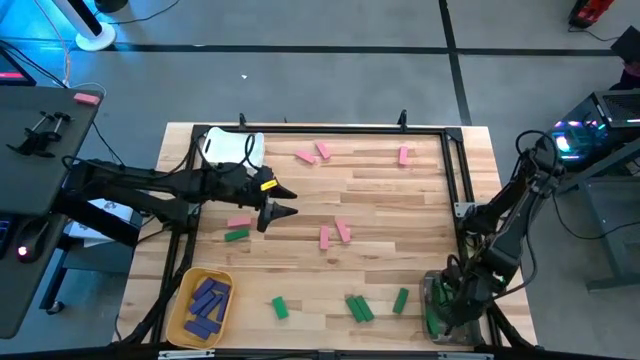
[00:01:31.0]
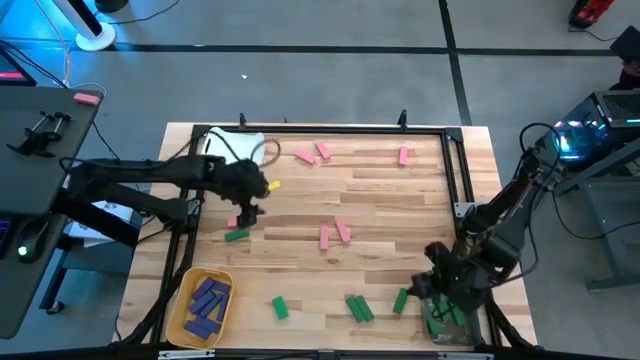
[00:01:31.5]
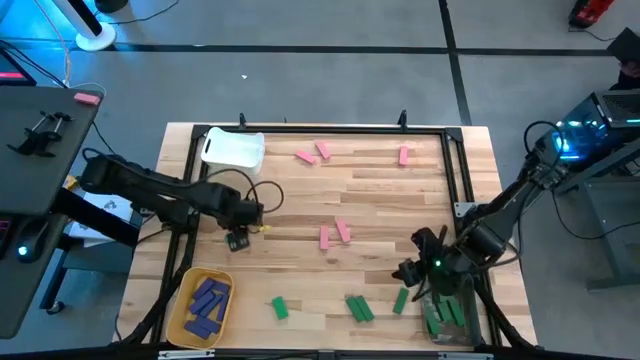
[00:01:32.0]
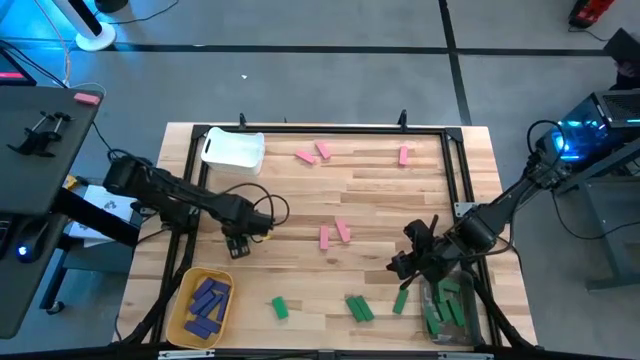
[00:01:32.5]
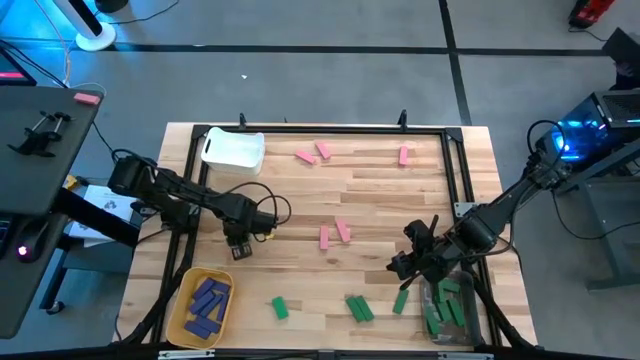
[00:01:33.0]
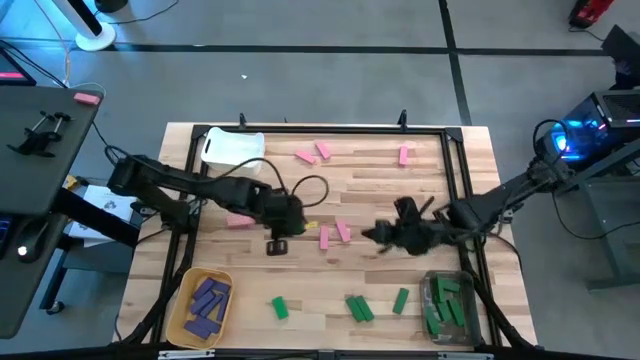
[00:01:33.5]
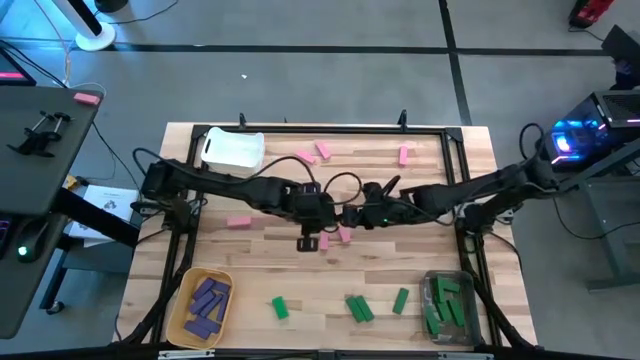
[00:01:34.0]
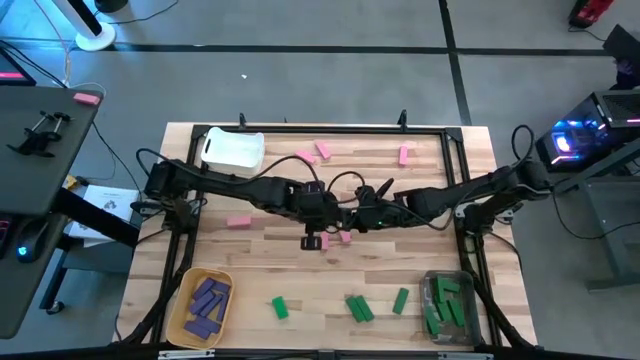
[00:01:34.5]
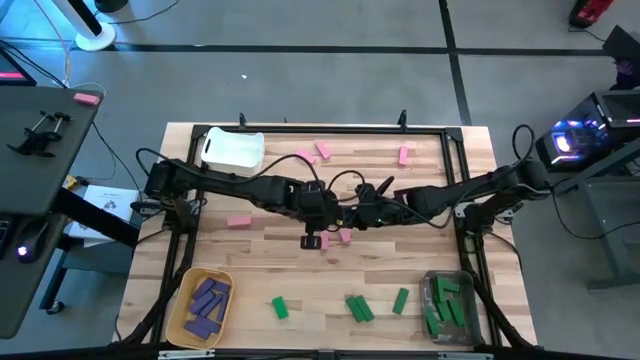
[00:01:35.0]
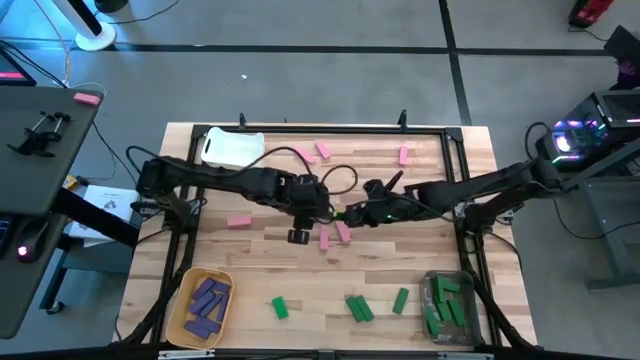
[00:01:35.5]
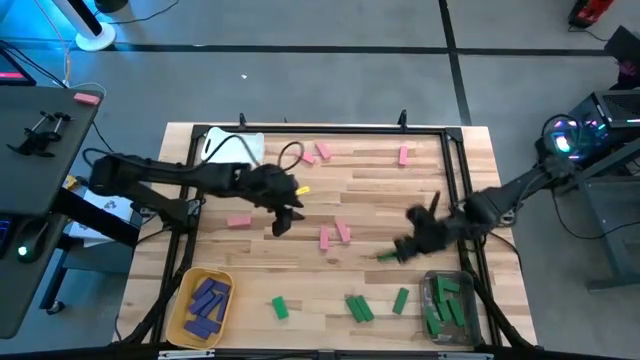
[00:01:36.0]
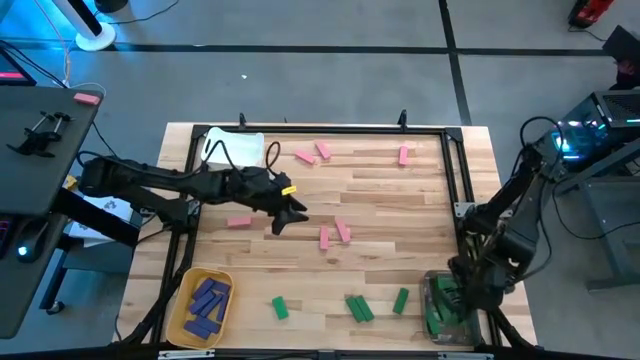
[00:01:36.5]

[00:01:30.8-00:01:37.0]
Task: Sort blocks
Put the green block into the black bin

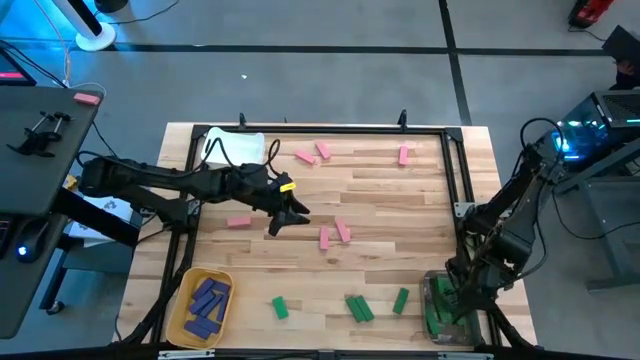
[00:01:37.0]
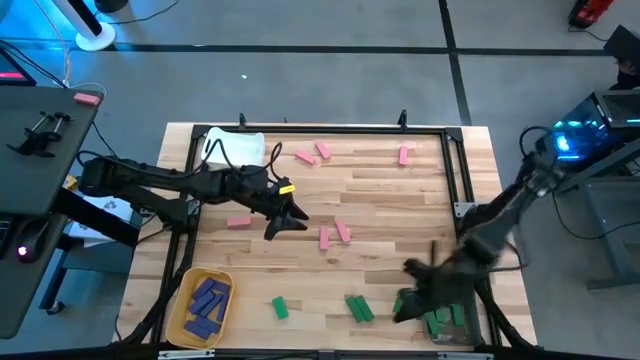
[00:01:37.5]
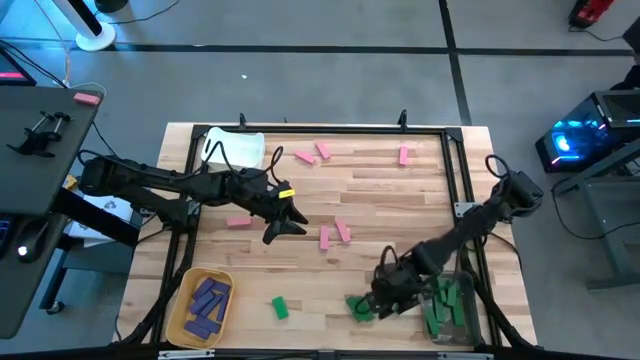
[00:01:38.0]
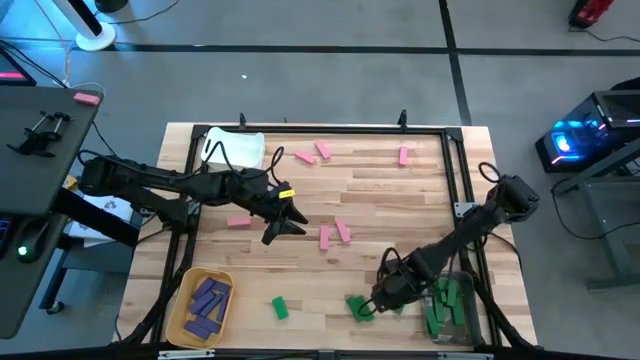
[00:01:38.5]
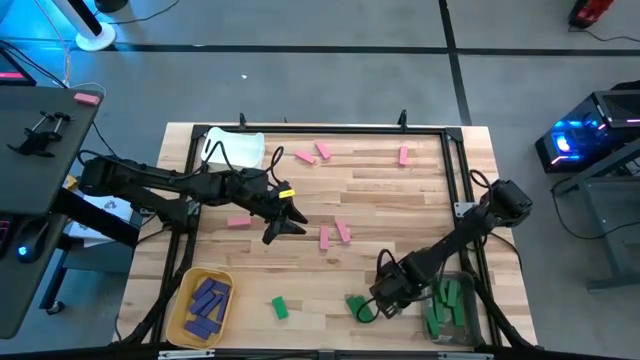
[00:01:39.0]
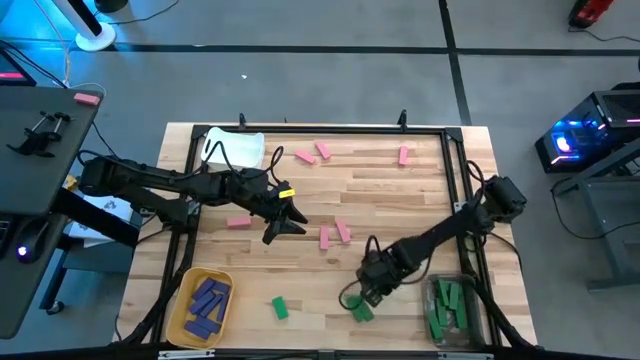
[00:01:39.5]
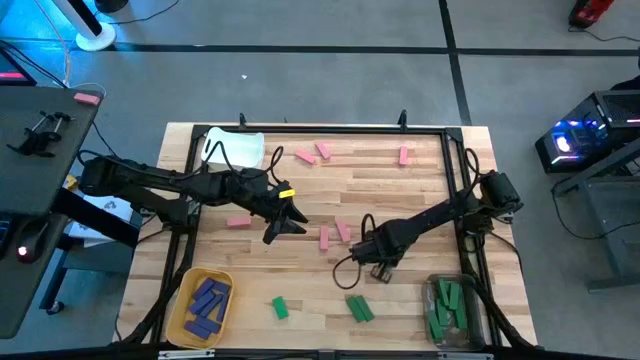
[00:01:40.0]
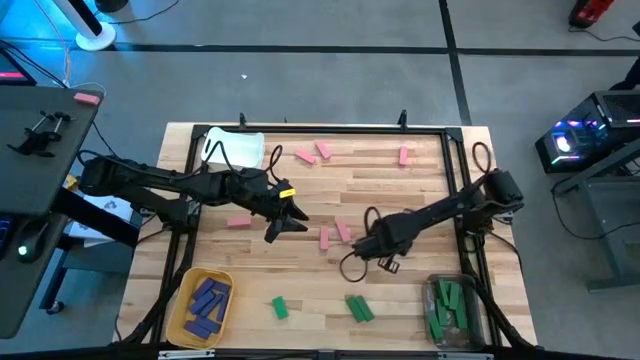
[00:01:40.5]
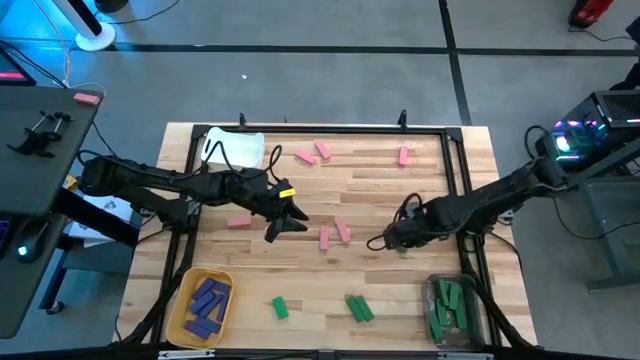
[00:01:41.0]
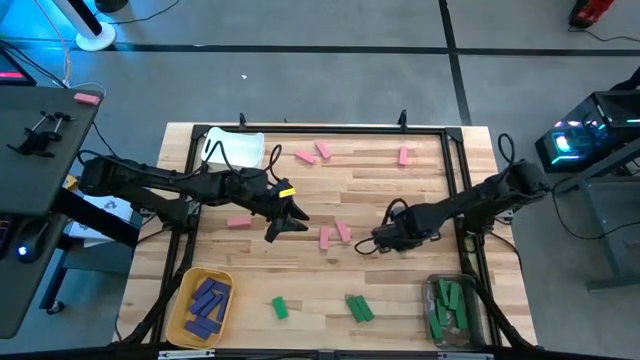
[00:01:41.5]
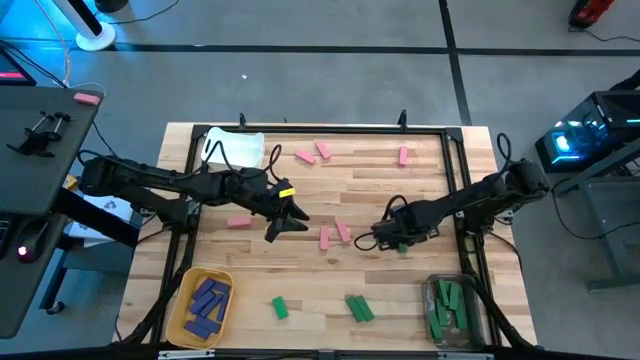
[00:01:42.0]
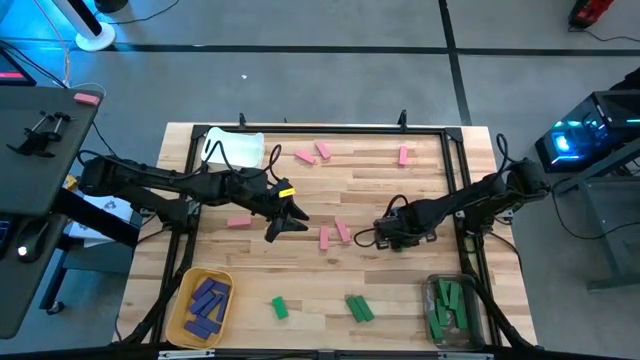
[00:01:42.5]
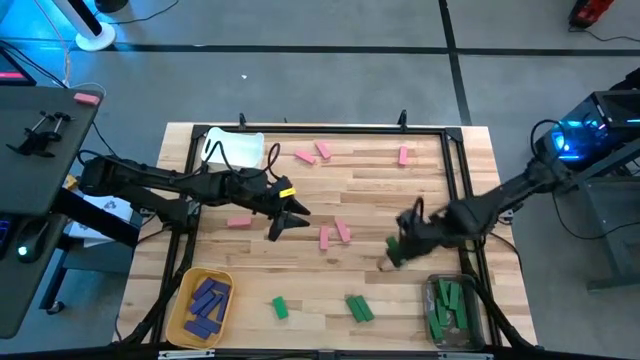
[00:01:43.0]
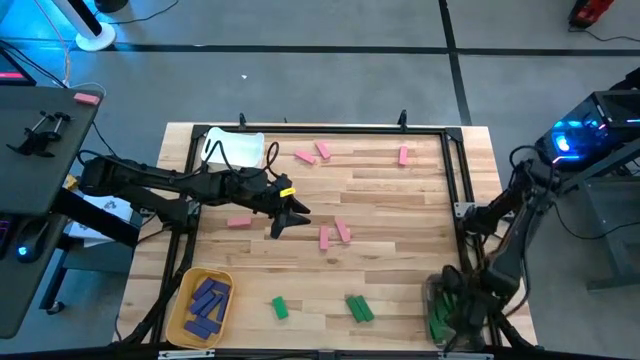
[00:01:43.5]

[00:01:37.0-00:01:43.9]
Put the green block into the black bin

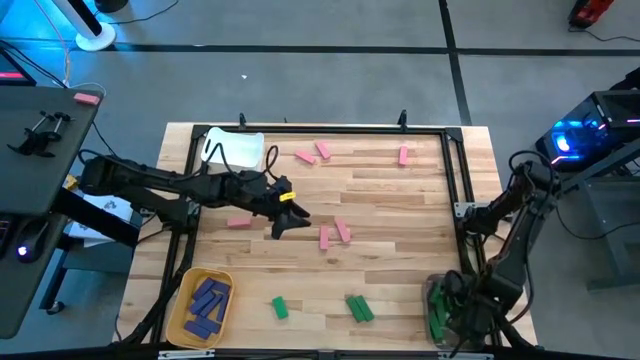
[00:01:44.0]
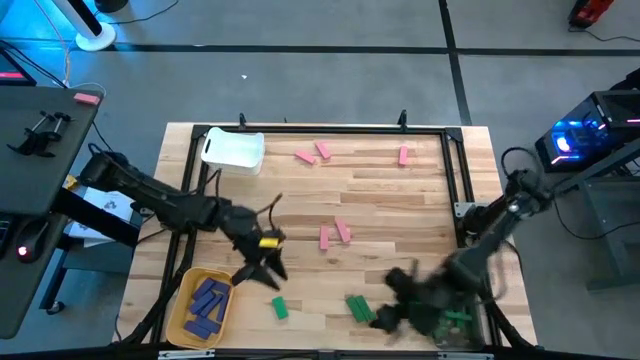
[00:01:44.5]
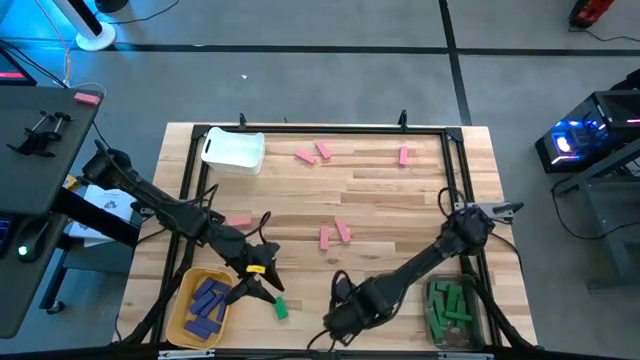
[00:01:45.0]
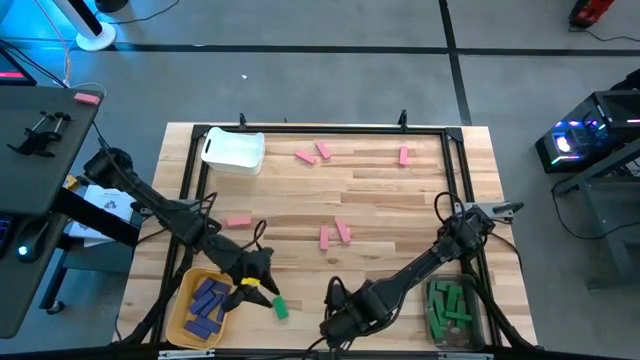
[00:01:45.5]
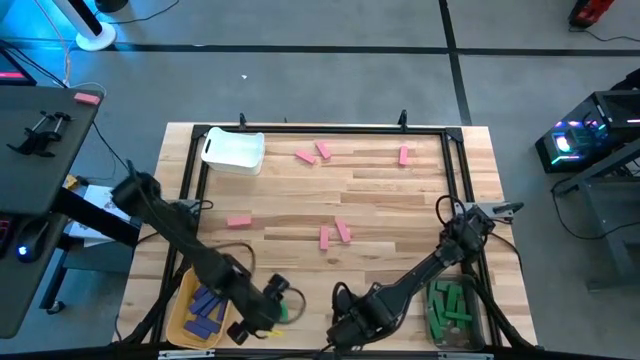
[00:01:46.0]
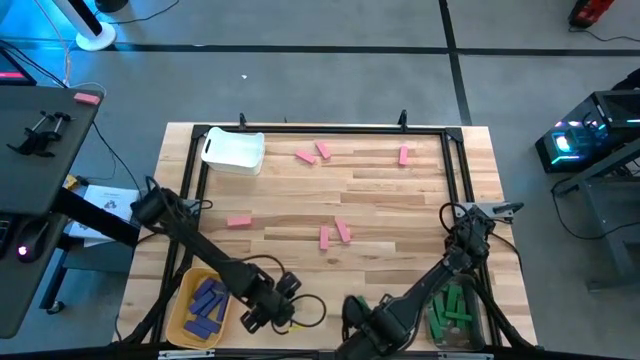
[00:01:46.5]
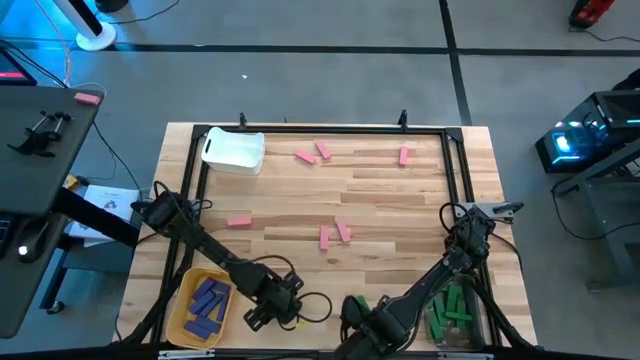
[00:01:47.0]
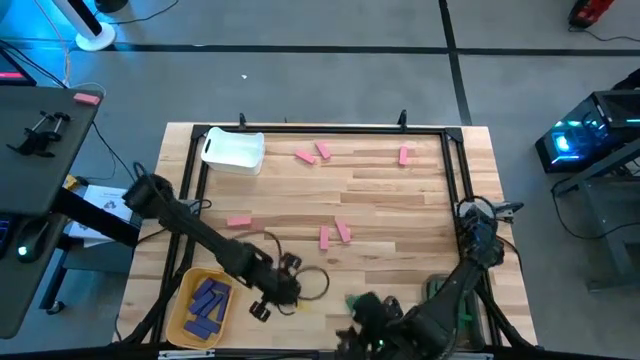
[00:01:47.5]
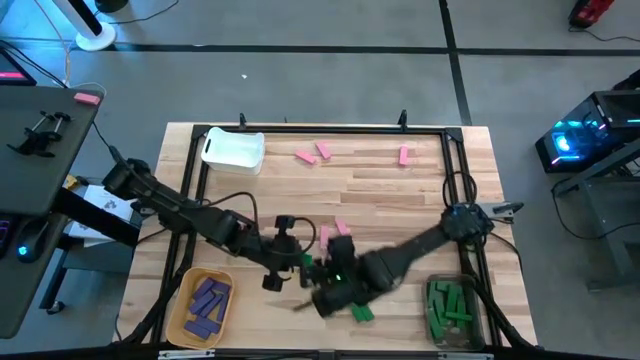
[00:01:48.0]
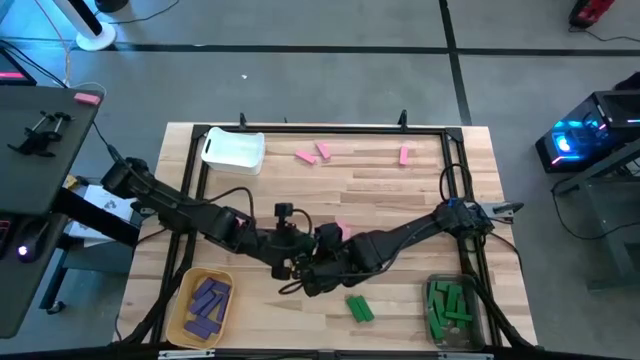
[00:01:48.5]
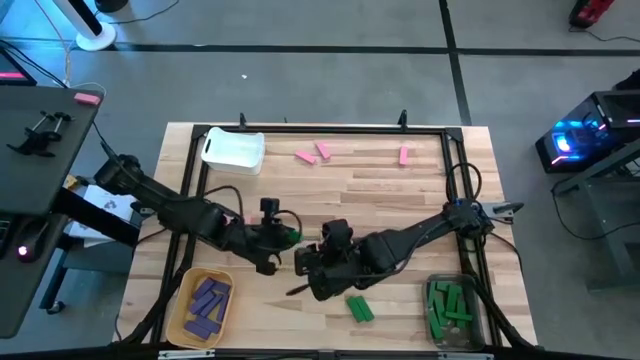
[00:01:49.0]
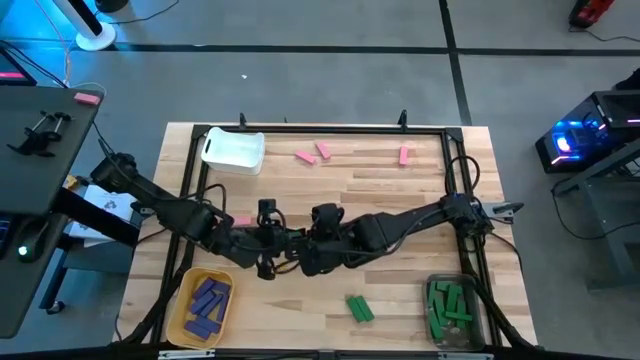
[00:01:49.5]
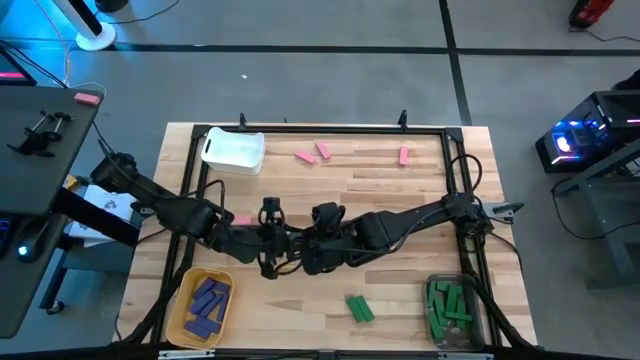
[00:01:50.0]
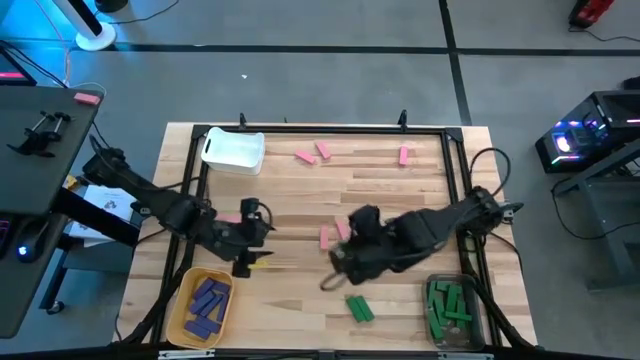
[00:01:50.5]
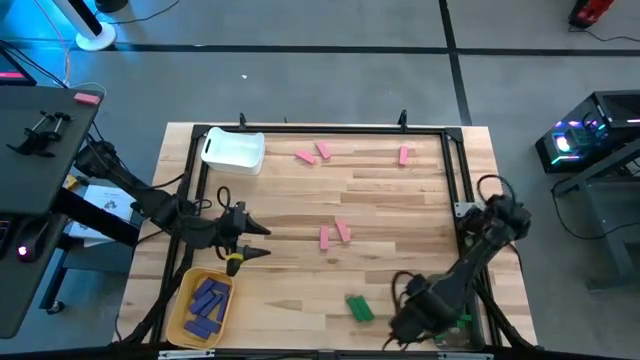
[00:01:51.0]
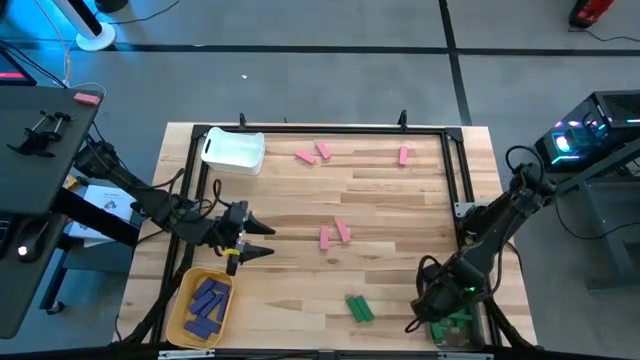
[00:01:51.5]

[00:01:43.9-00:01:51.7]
Put the green block into the black bin
